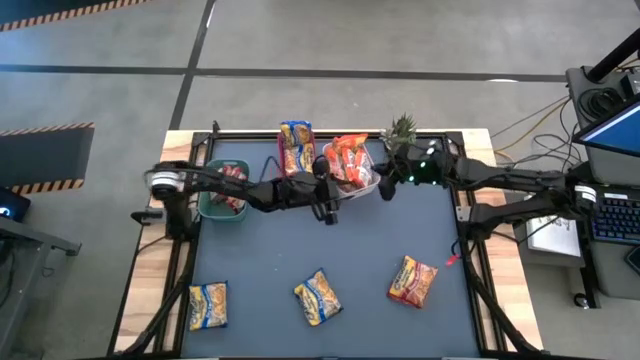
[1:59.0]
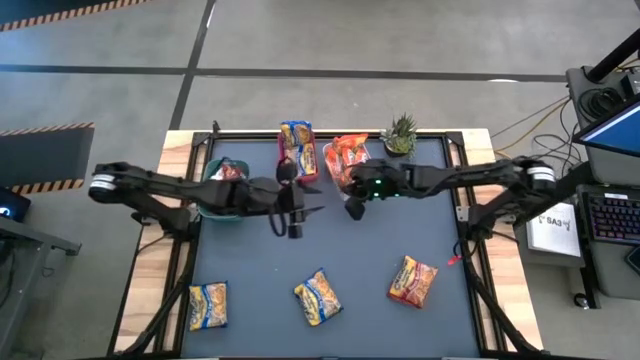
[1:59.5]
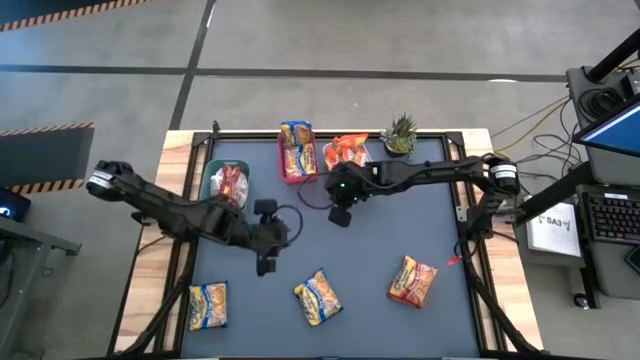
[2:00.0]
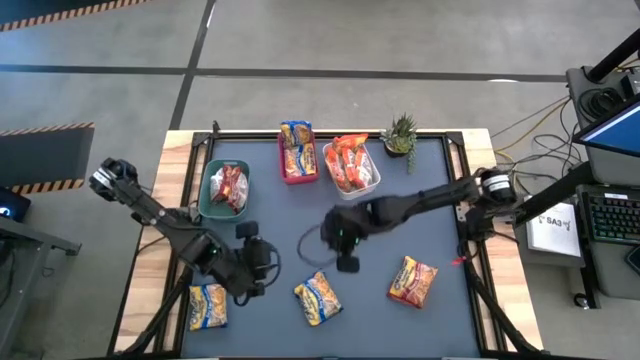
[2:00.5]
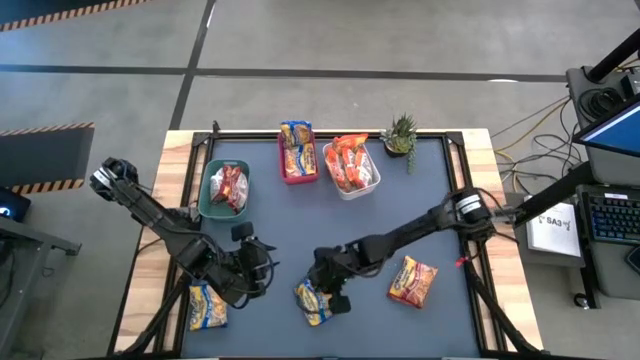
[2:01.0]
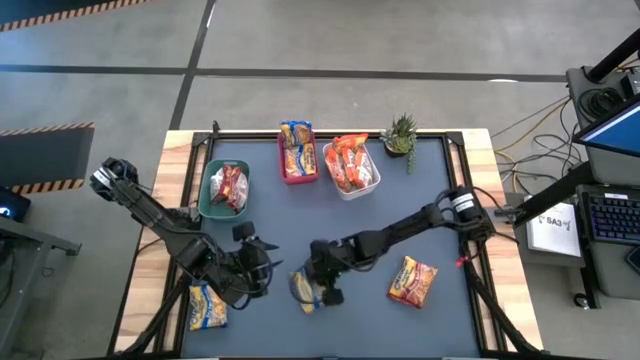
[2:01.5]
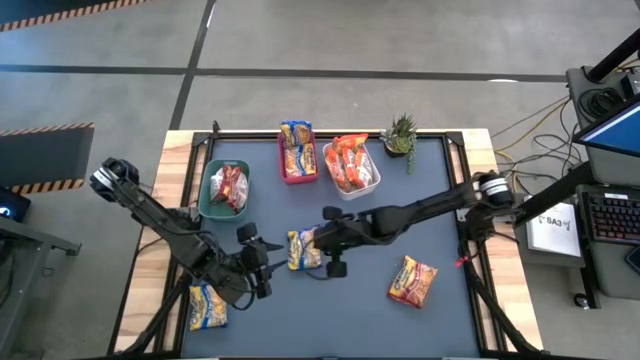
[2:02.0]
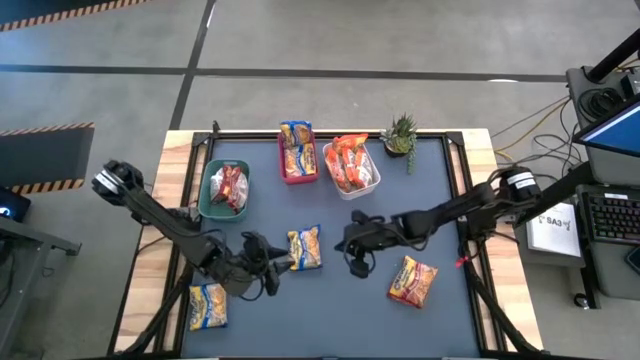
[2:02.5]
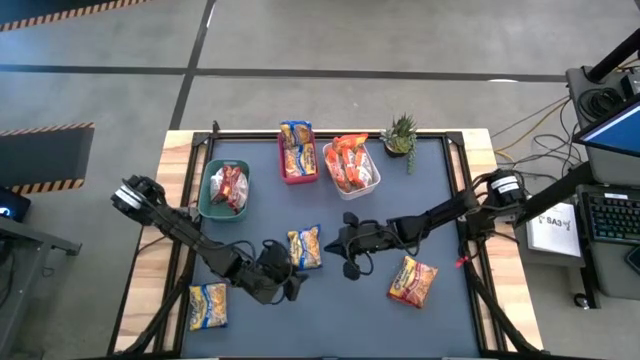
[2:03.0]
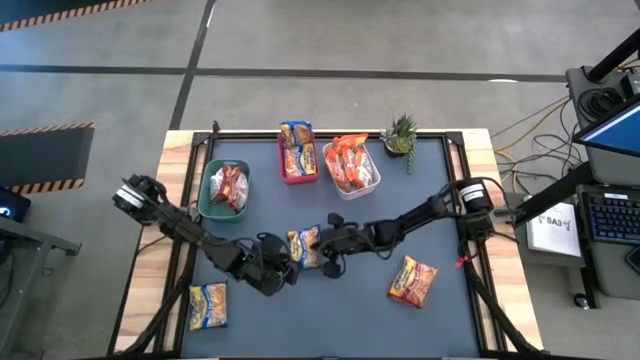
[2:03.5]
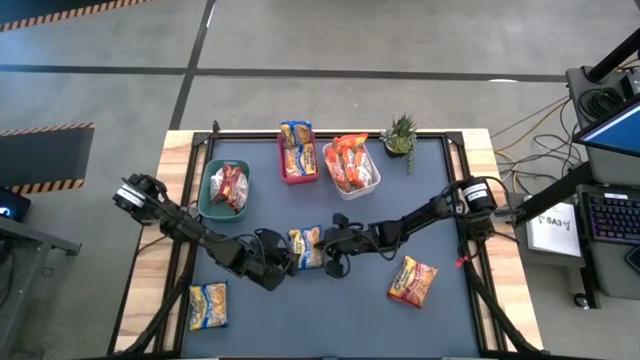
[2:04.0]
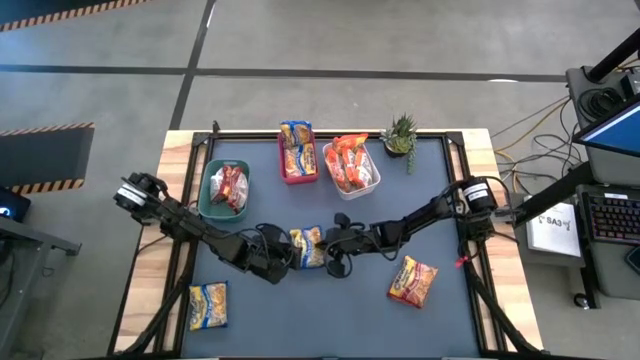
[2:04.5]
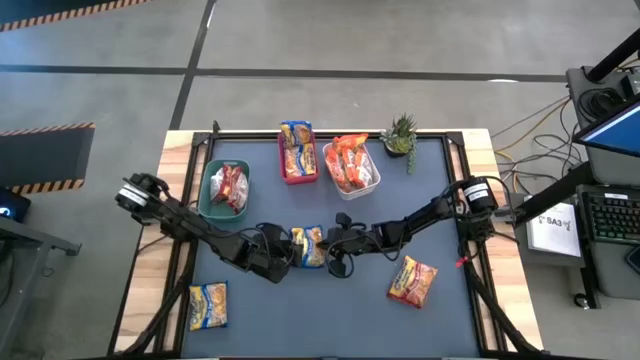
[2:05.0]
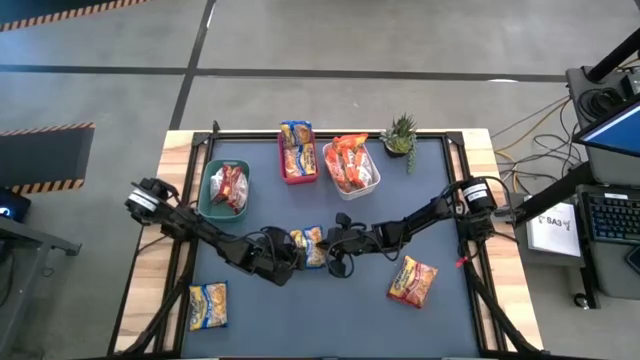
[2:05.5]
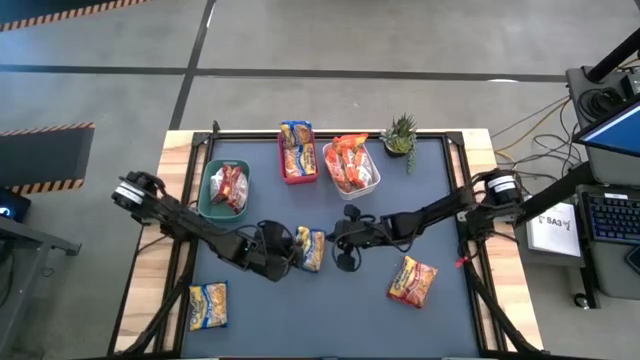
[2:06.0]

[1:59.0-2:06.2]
Task: Sort Maruchan noodles
Put the right blue noodle pack into the red bin

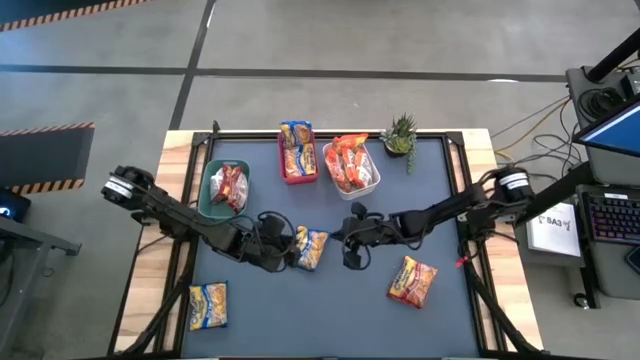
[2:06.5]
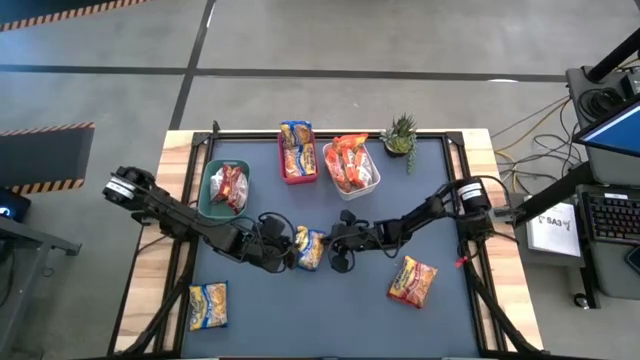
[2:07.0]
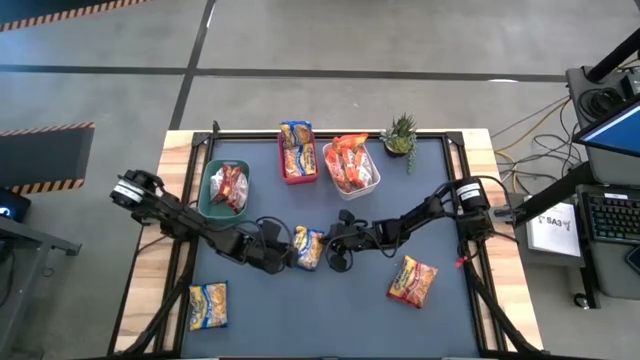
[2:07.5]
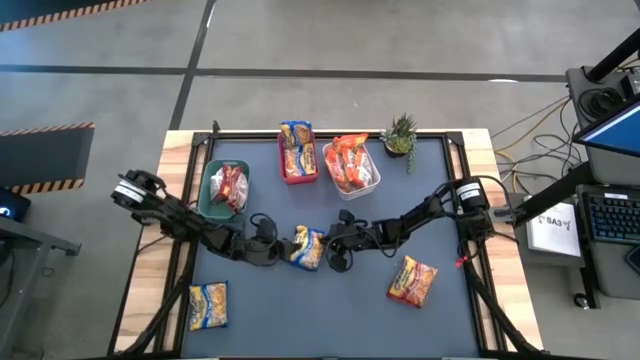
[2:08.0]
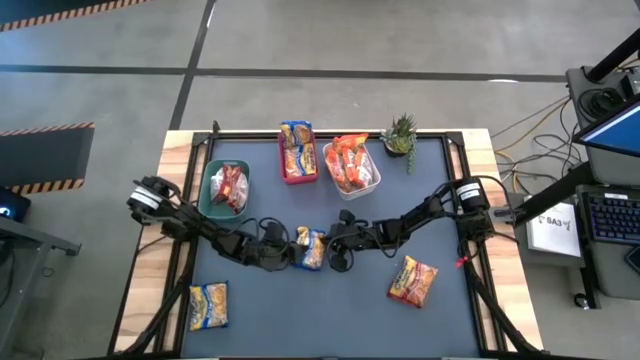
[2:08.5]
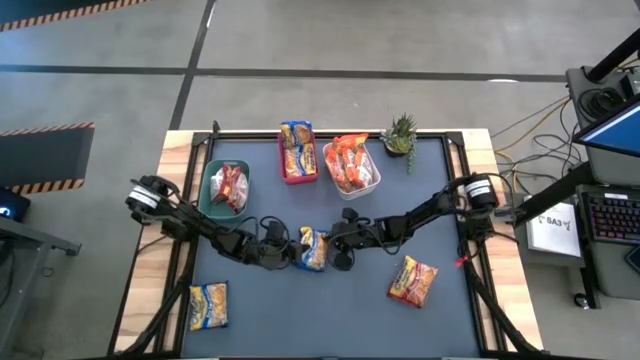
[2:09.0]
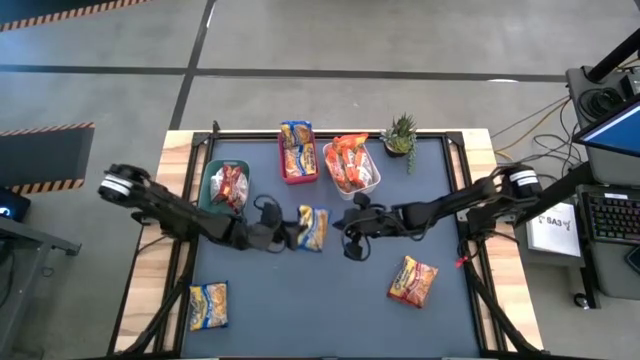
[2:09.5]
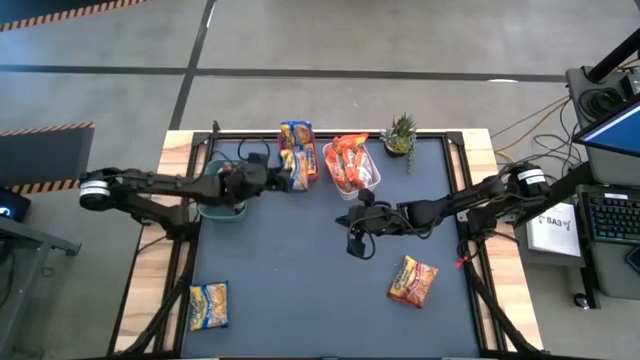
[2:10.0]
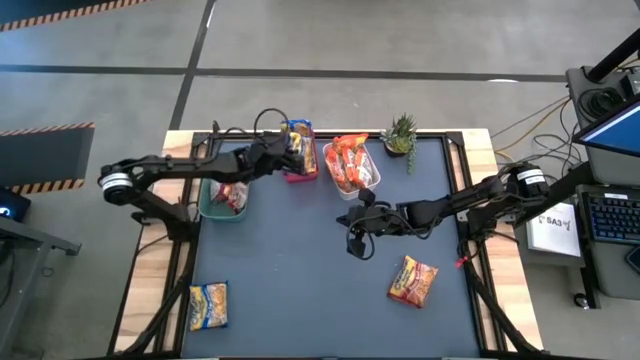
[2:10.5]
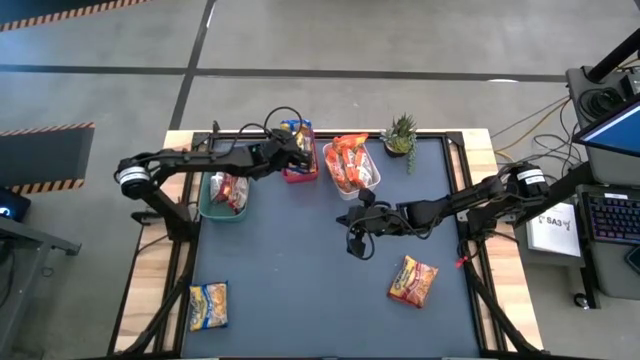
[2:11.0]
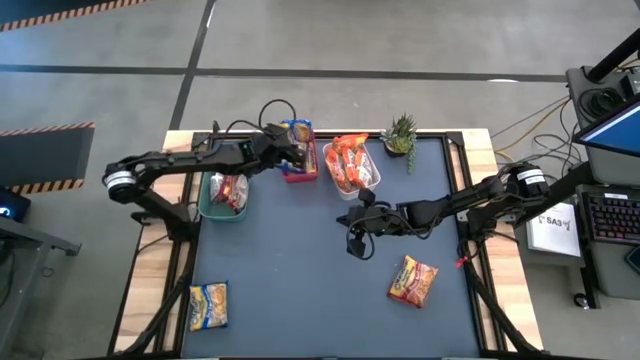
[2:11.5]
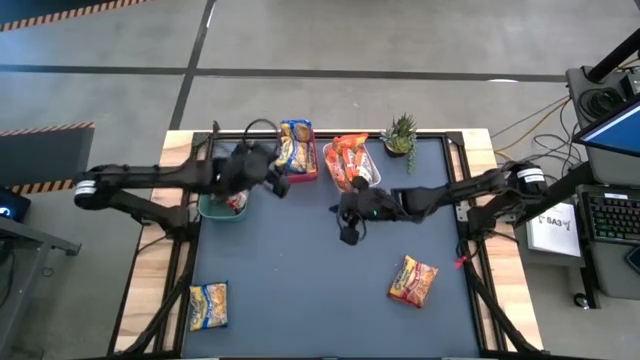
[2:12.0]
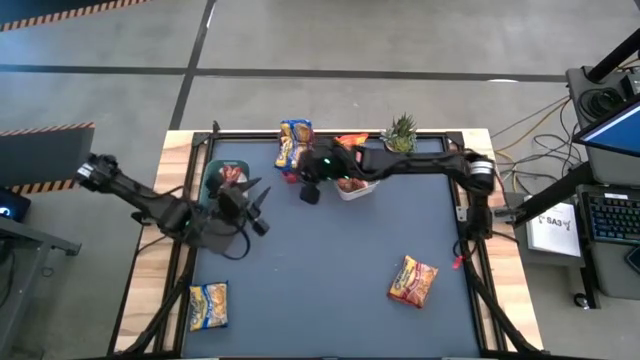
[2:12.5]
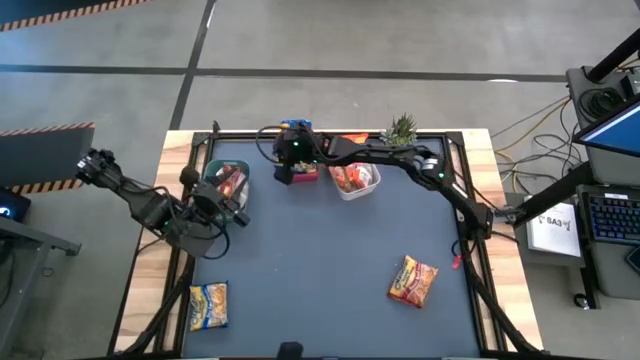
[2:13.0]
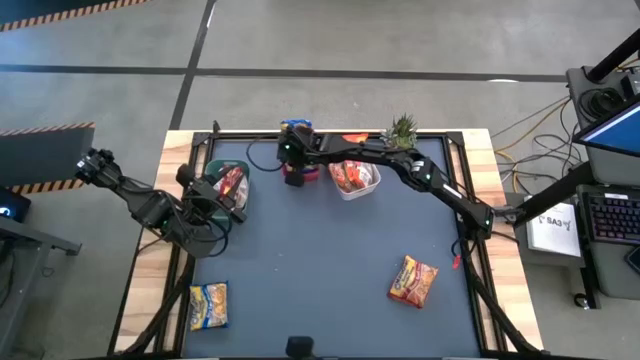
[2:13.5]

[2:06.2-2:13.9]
Put the right blue noodle pack into the red bin

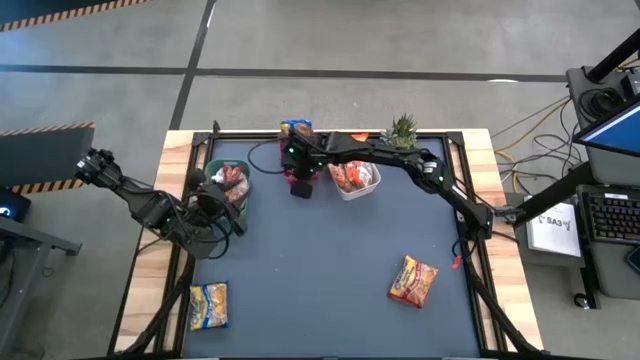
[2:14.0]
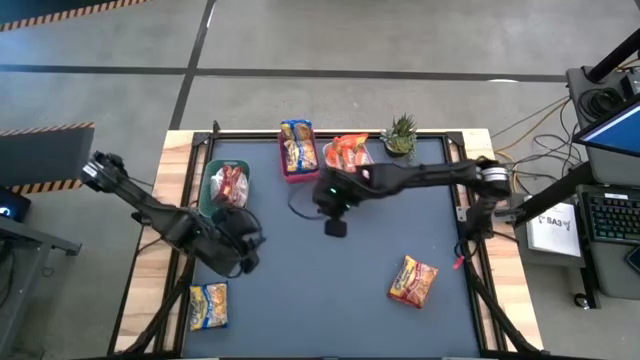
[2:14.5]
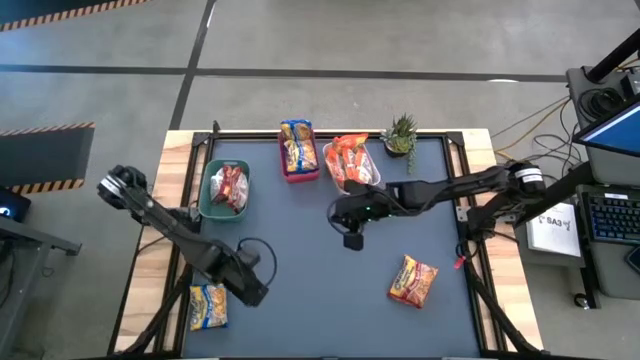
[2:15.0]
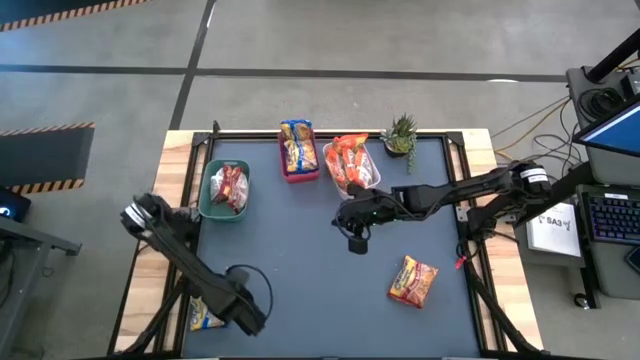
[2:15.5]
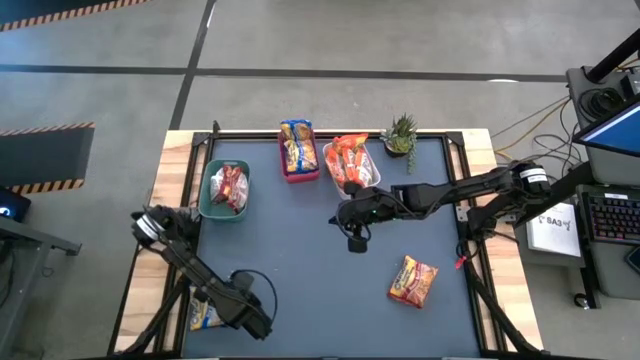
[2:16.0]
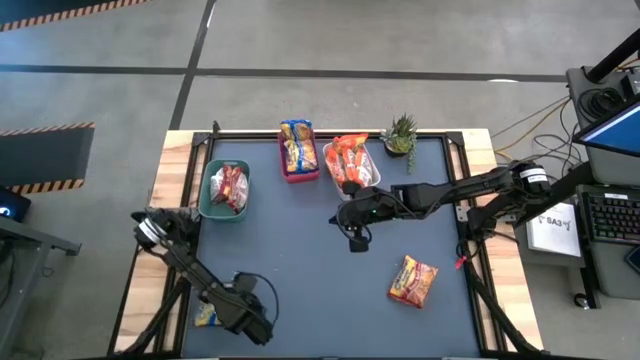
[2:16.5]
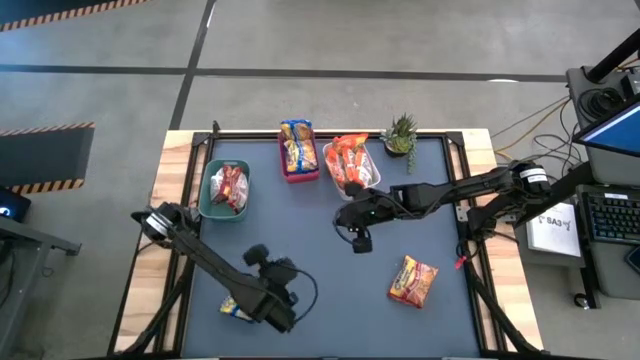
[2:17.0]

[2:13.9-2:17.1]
Put the blue noodle pack into the red bin

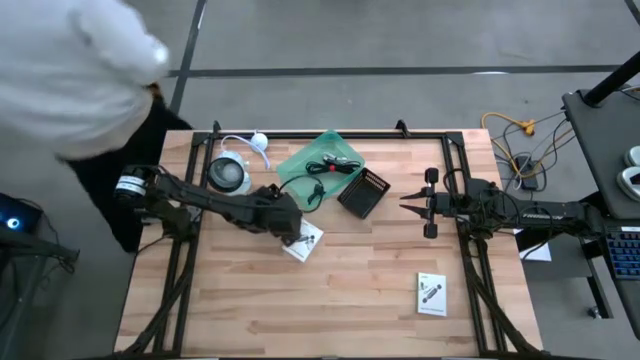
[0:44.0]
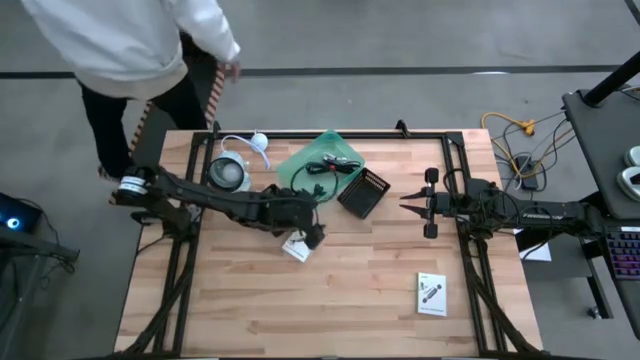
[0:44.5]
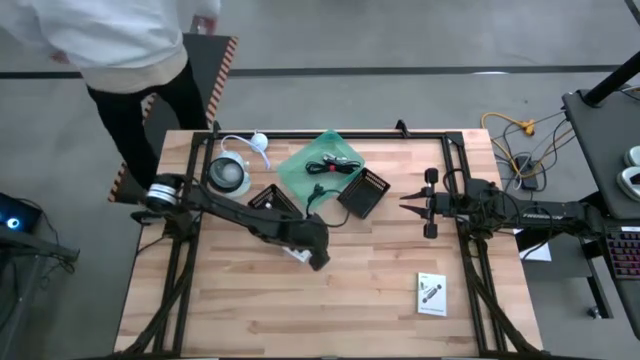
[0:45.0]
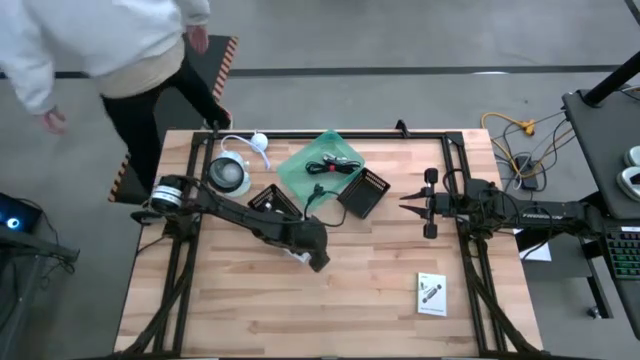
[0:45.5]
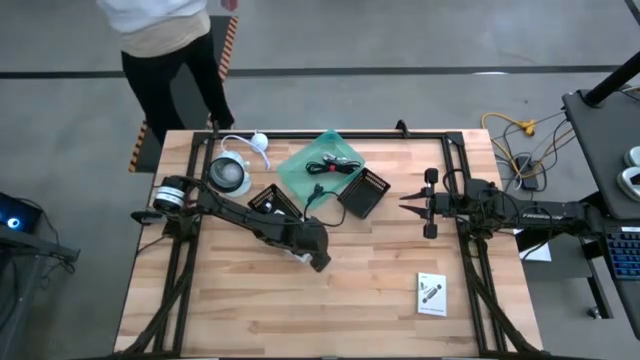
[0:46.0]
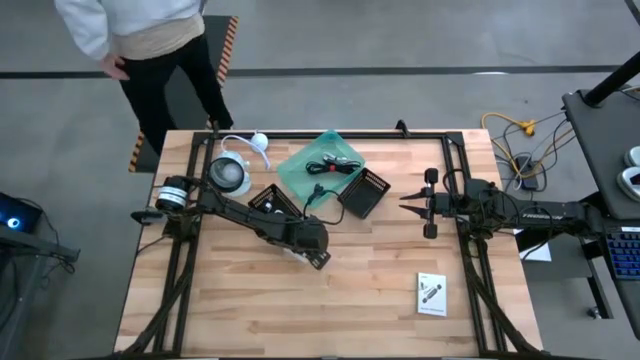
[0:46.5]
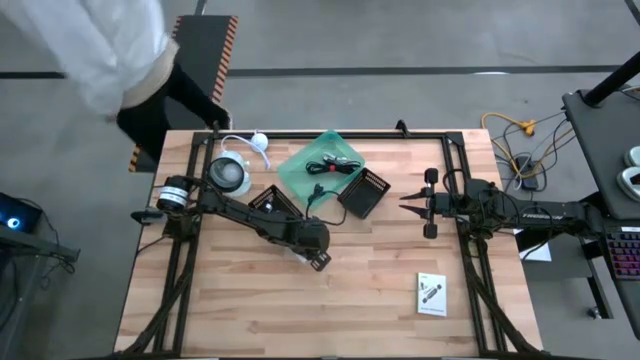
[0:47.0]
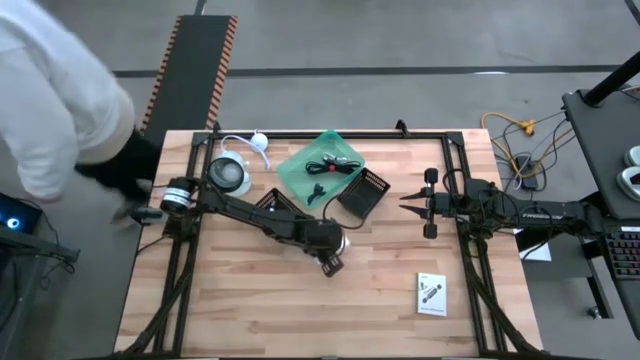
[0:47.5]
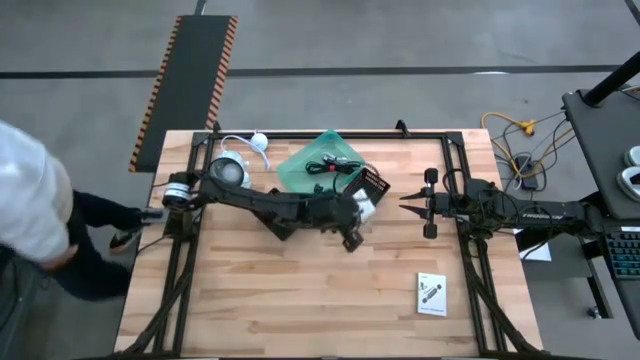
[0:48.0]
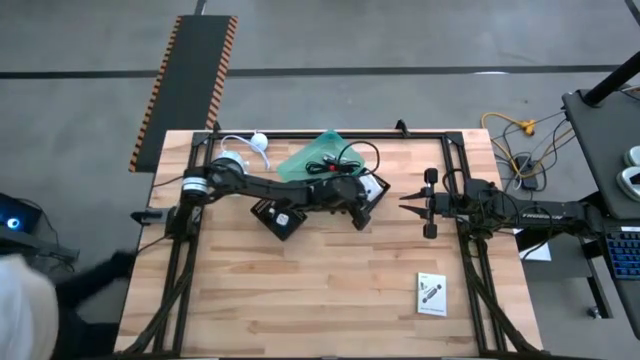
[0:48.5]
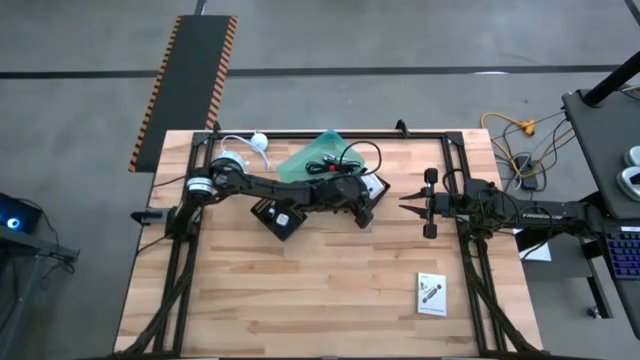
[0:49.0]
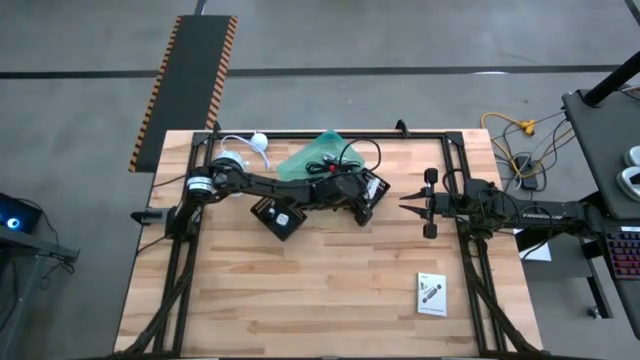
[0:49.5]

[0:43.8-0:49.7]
Task: Pick and place items into bin
Put the left card reader box into the right black bin
